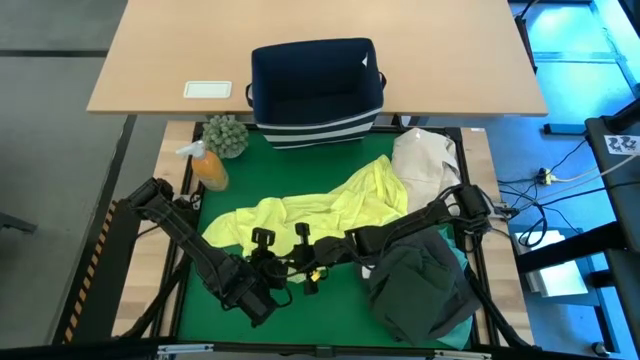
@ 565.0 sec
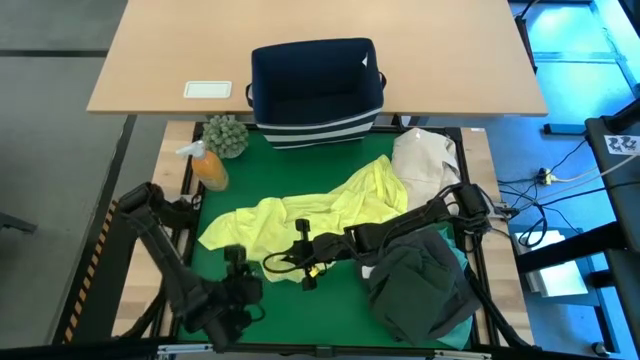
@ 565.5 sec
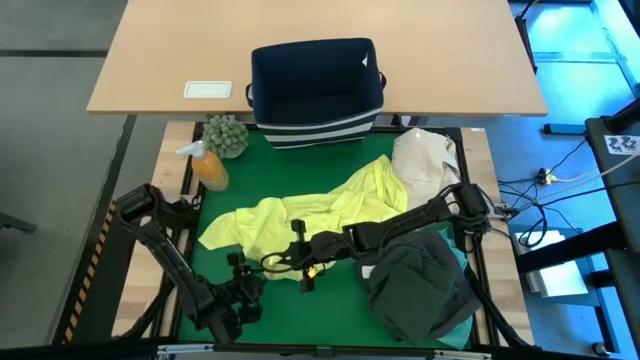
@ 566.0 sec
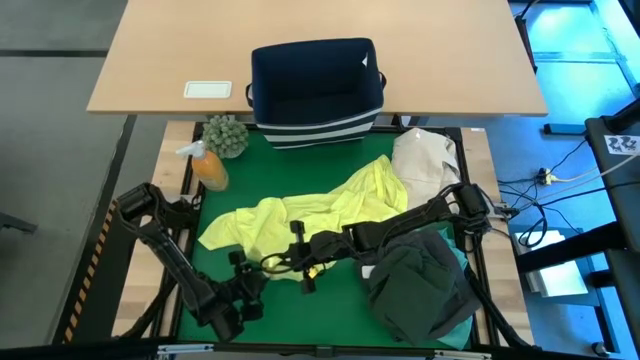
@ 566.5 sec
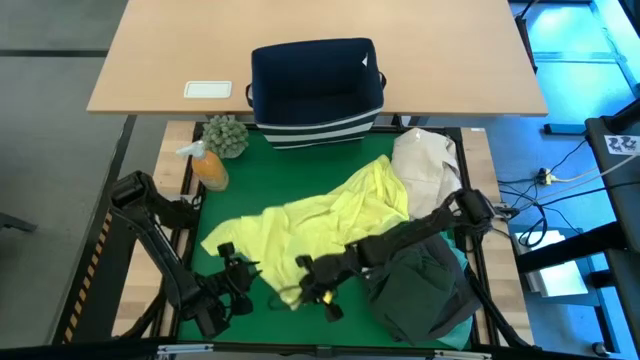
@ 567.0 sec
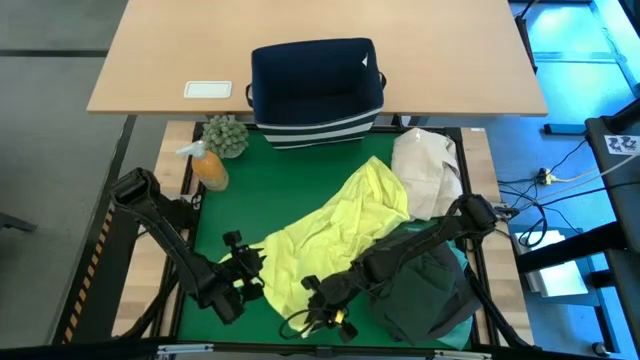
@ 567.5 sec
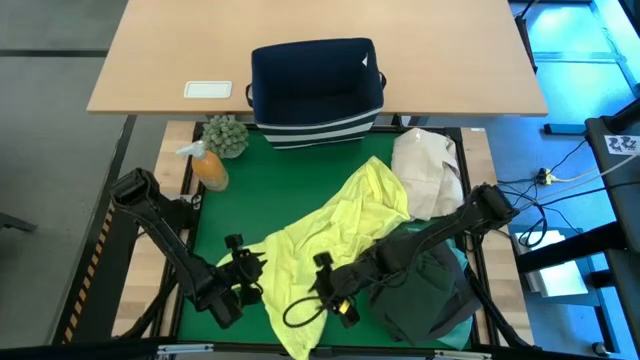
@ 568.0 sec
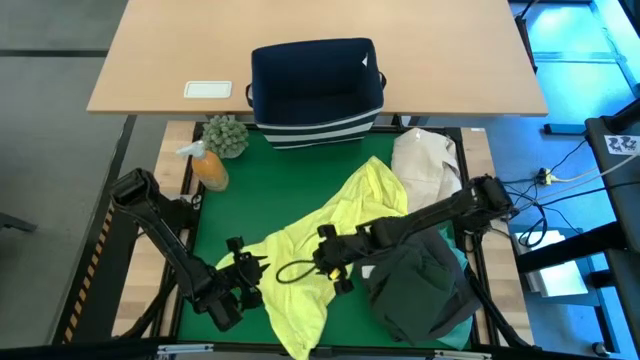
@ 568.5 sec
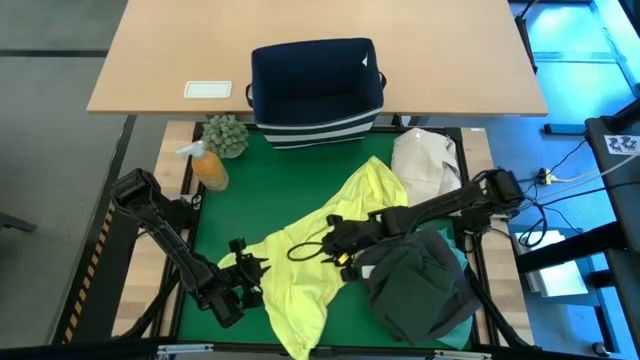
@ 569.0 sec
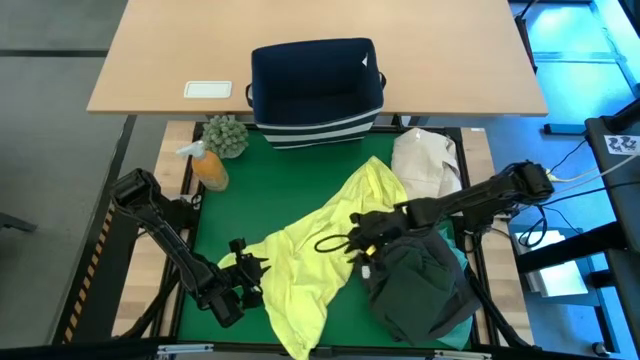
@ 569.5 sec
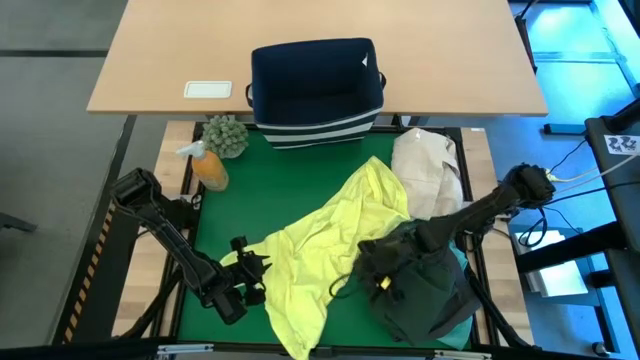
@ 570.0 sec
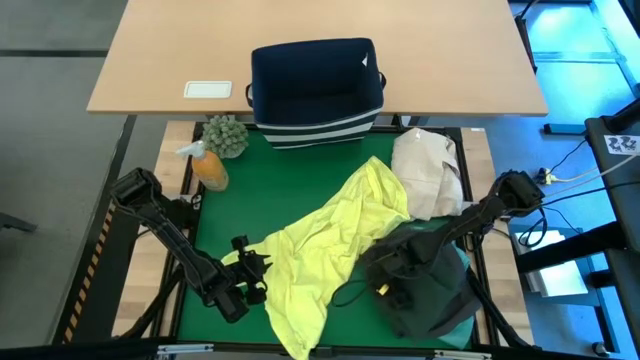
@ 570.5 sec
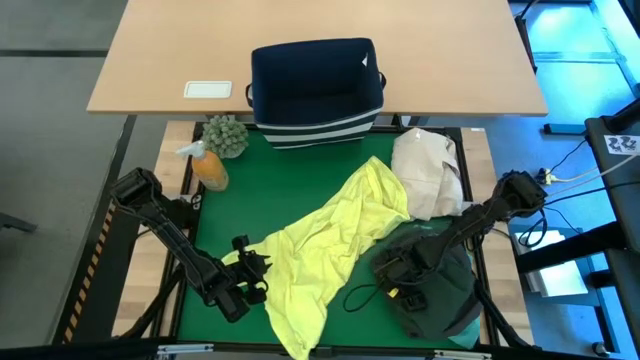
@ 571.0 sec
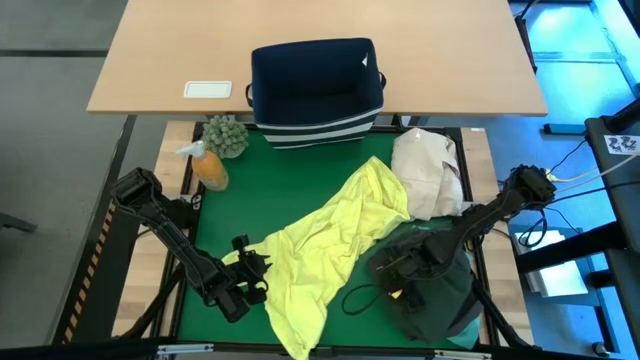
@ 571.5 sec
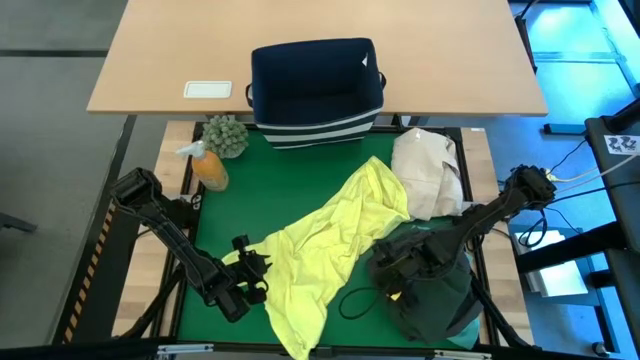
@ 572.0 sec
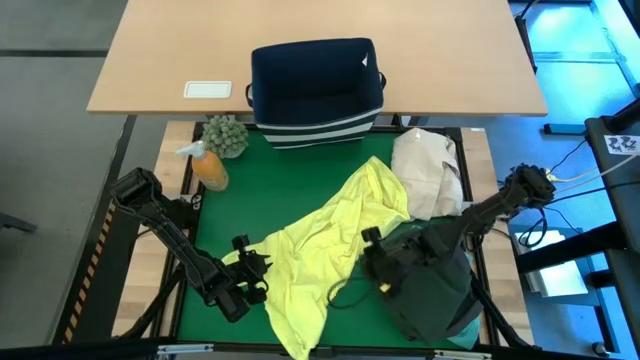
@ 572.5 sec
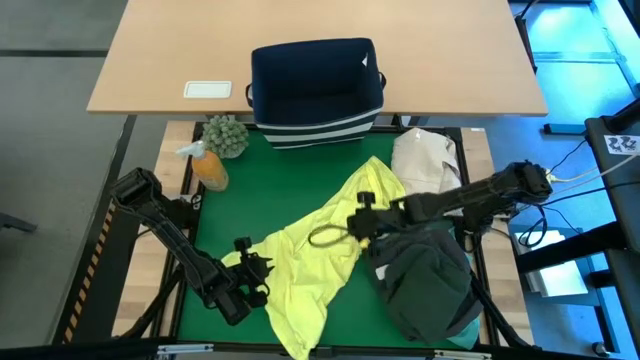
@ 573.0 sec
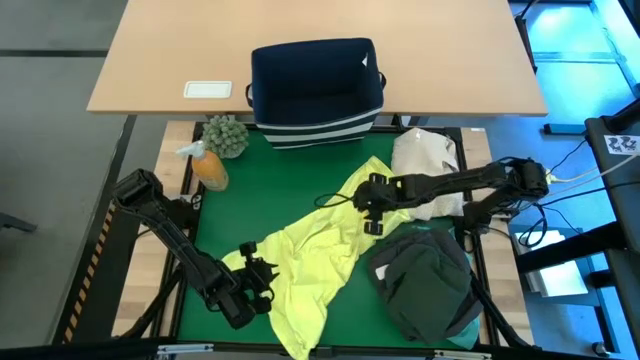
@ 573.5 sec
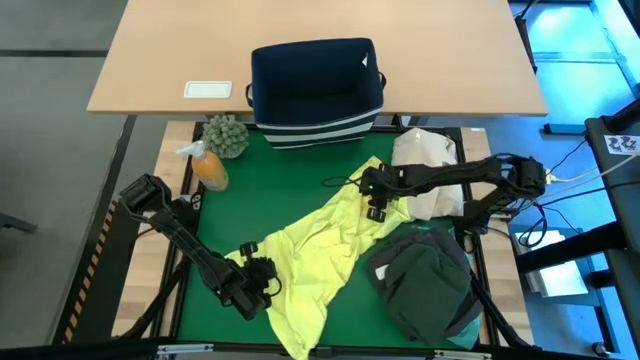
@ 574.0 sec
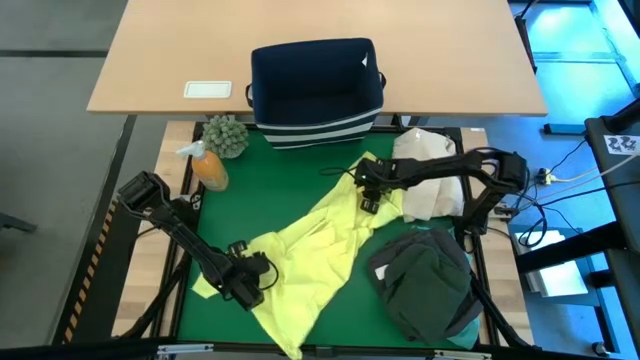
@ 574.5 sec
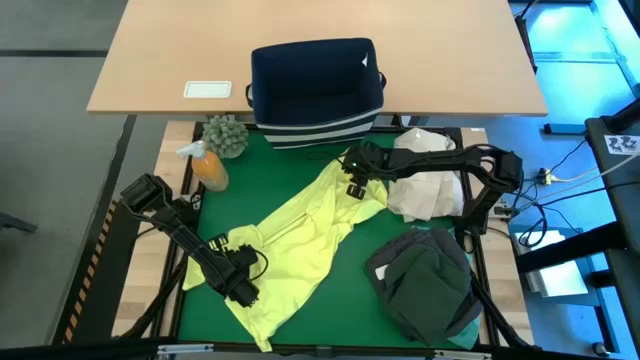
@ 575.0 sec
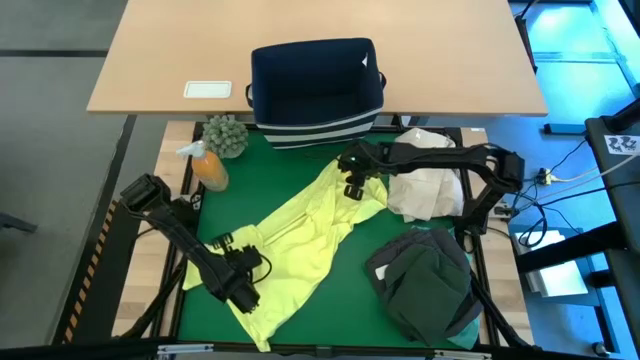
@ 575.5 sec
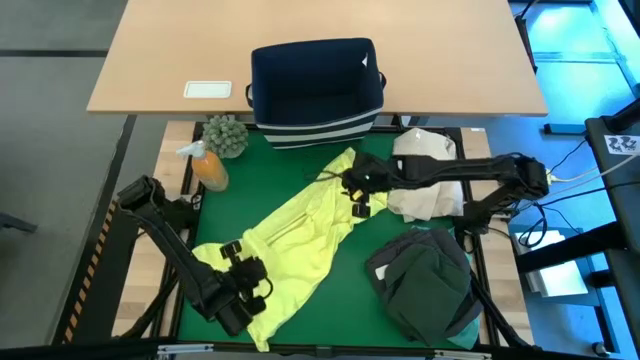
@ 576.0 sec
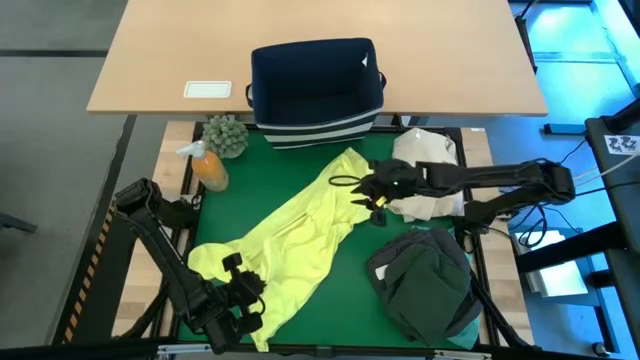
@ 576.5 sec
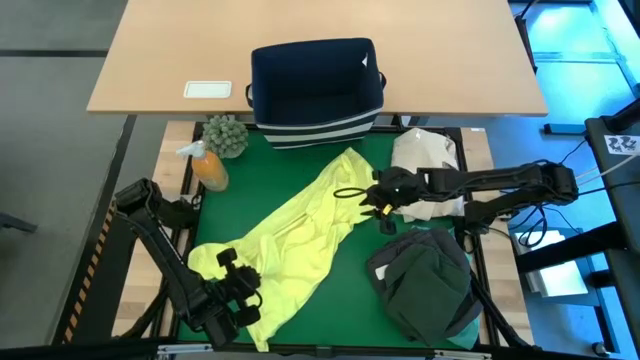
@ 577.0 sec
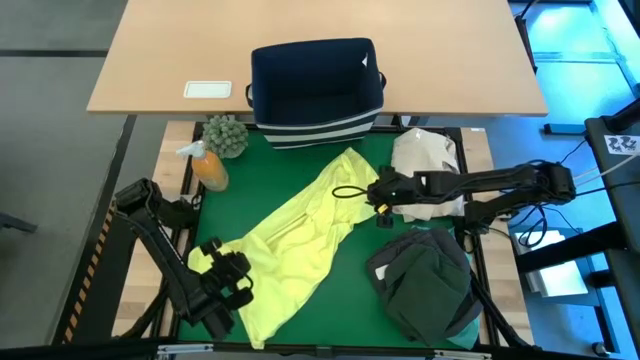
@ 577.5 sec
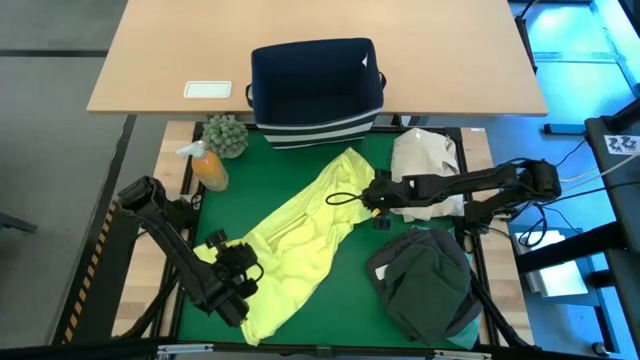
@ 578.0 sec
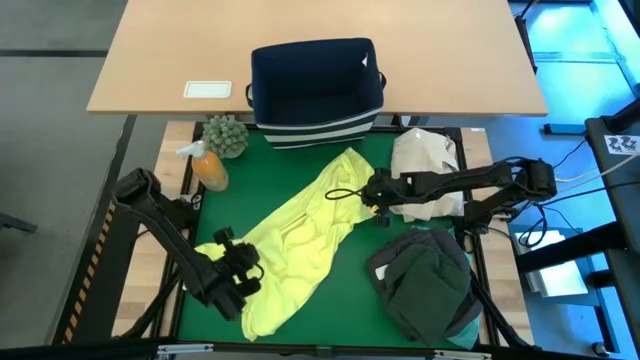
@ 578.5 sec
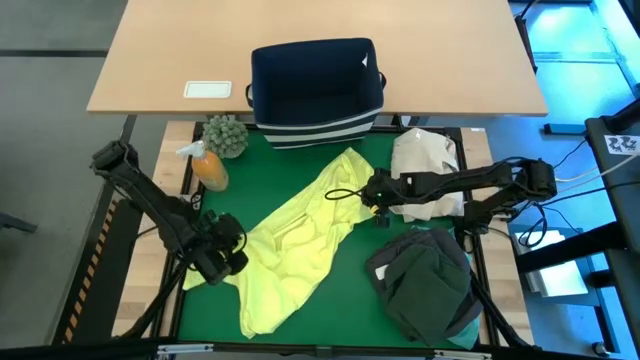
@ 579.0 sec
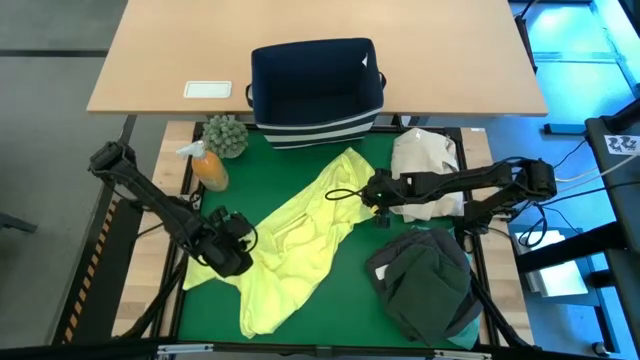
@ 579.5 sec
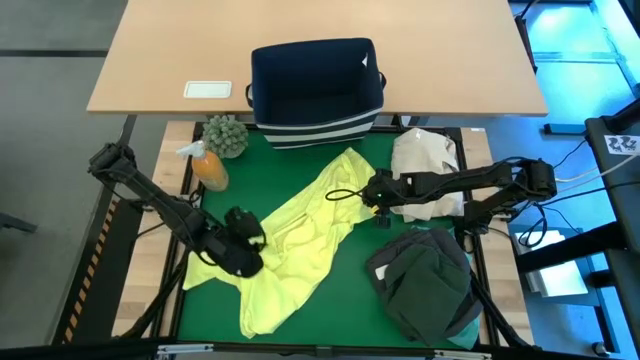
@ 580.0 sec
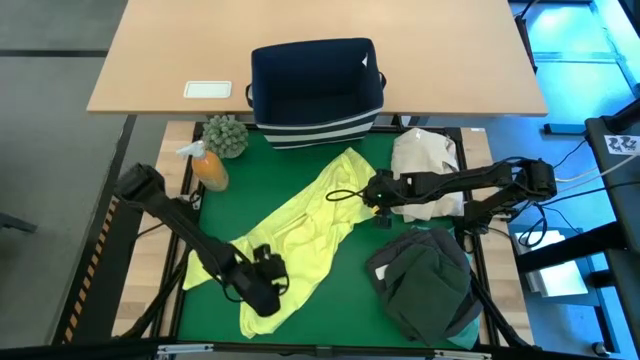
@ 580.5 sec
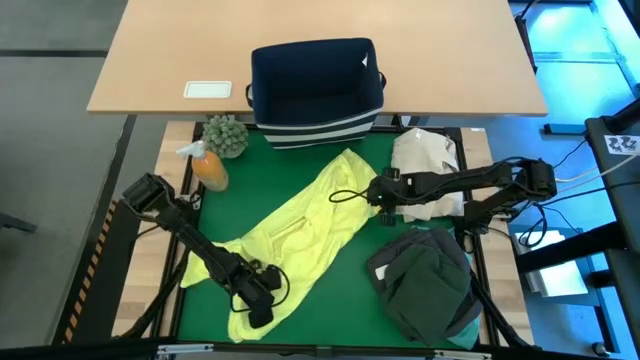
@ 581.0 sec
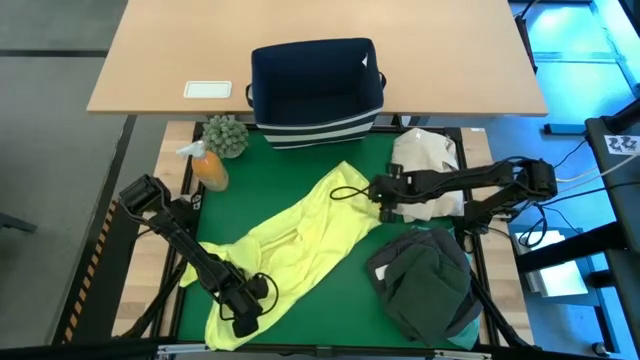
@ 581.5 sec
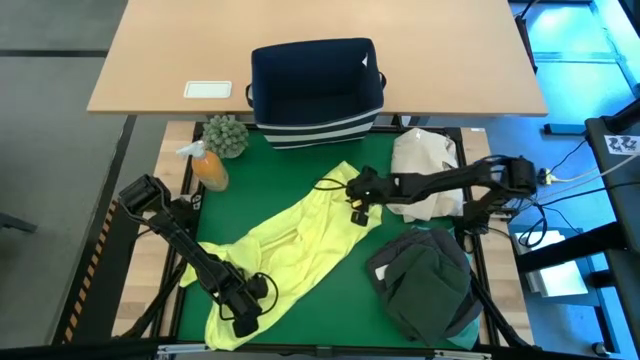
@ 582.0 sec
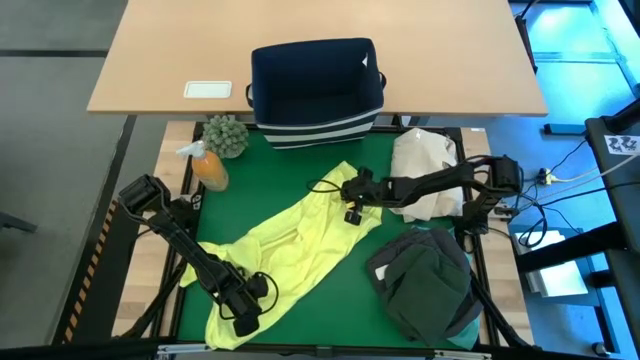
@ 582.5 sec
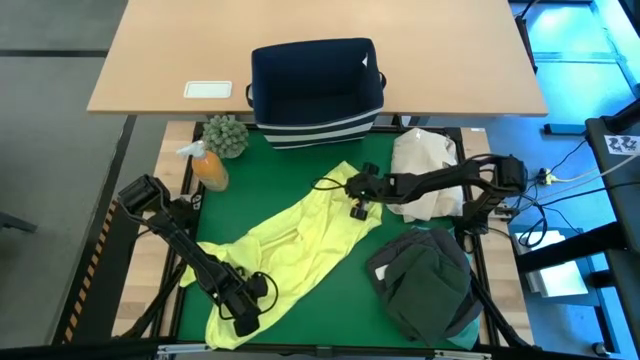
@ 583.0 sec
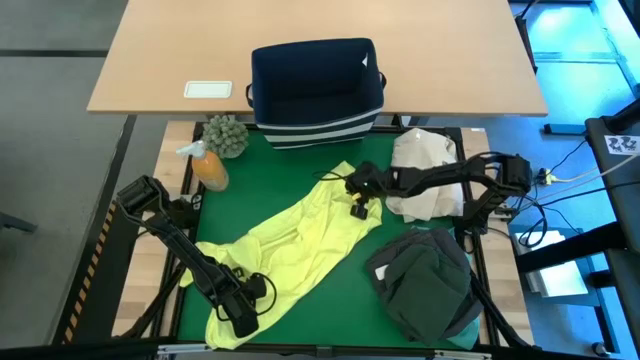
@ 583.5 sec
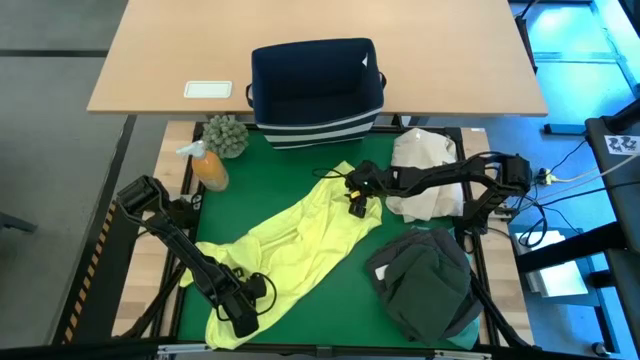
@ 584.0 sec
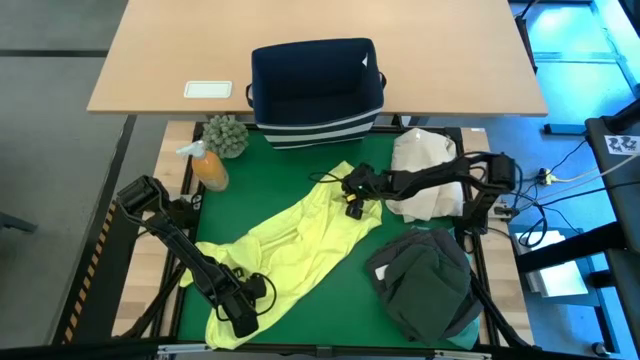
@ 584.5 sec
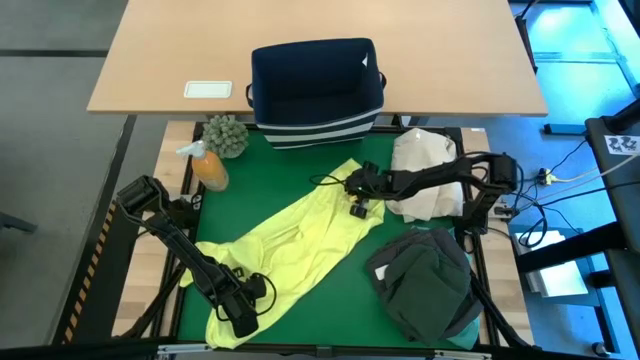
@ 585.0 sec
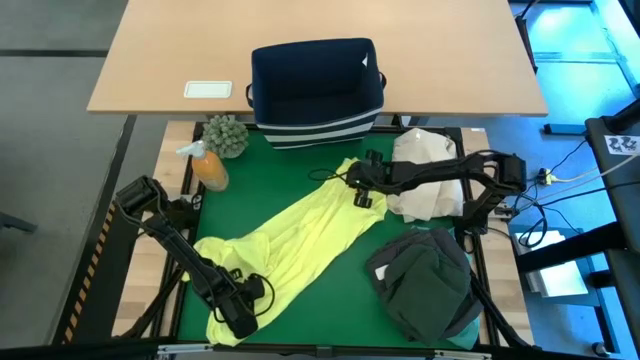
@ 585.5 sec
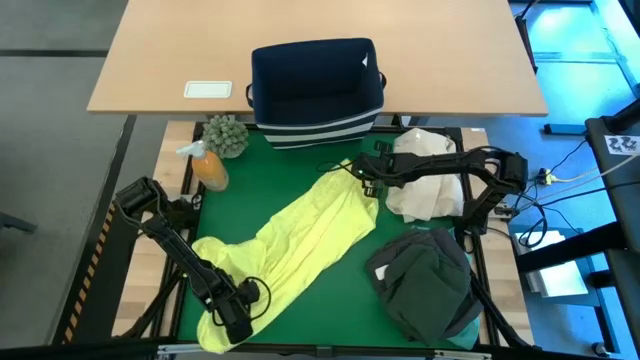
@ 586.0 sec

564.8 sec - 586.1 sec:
Task: Fold laundry
Fold the yellow shirt on the table
